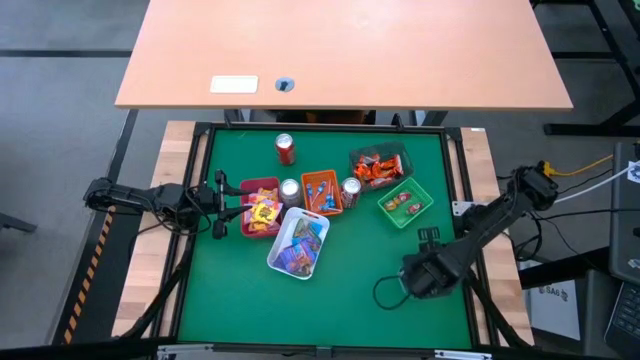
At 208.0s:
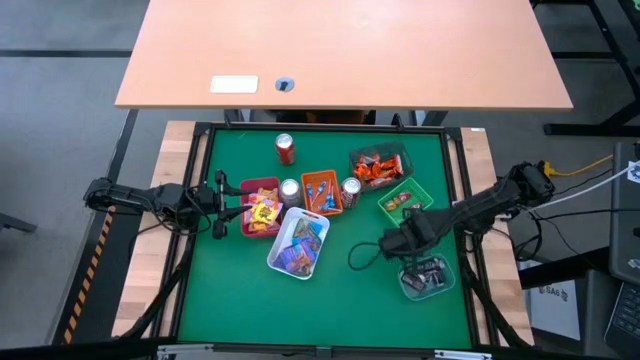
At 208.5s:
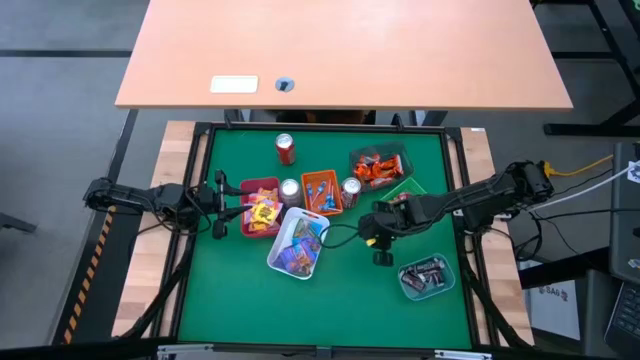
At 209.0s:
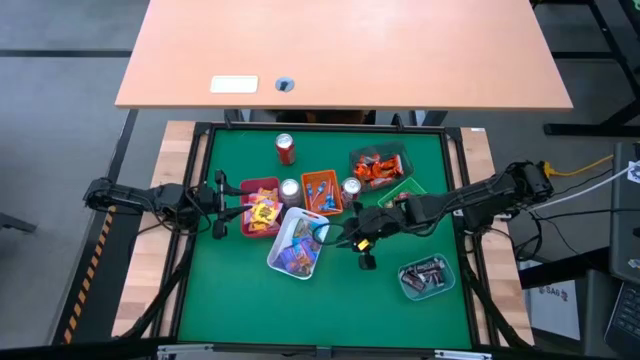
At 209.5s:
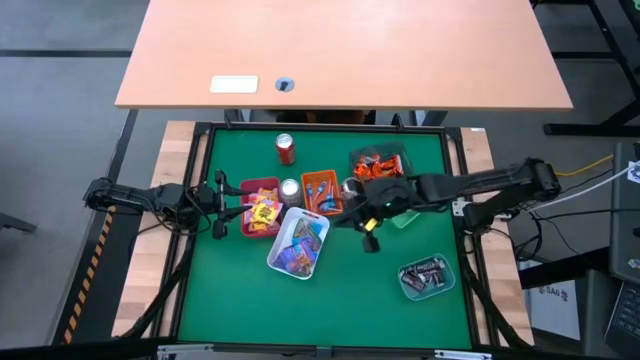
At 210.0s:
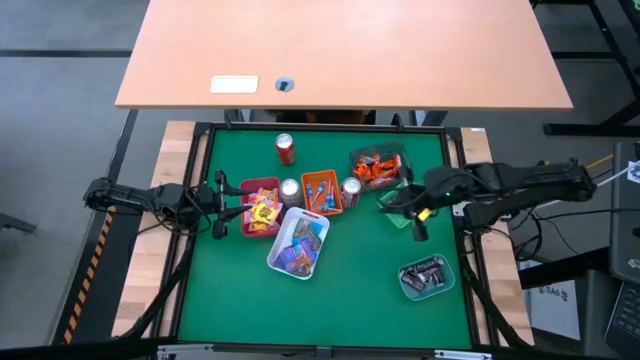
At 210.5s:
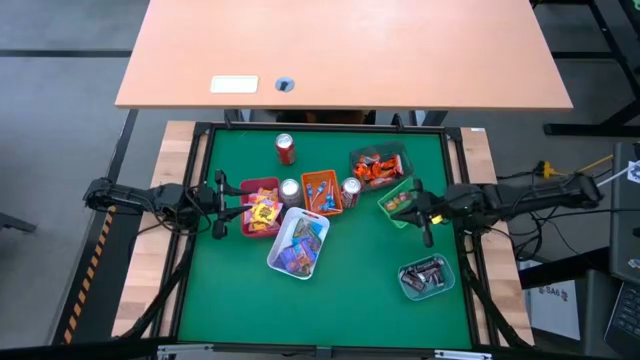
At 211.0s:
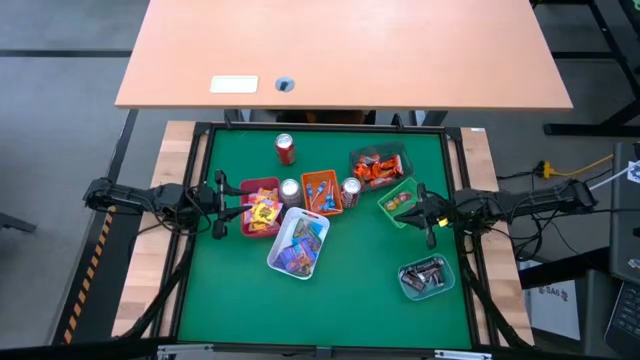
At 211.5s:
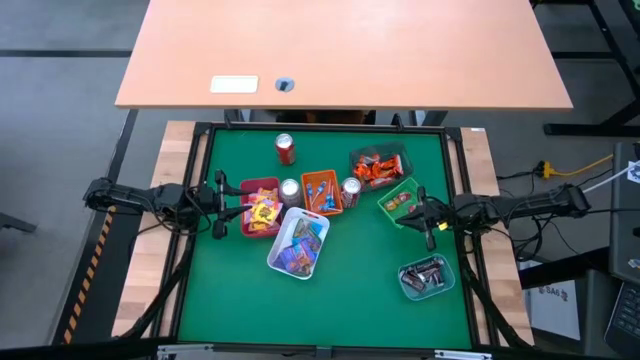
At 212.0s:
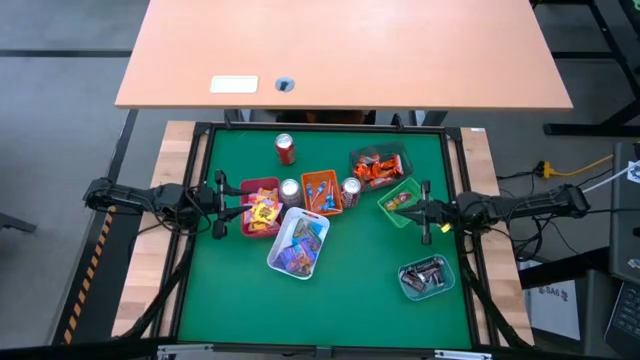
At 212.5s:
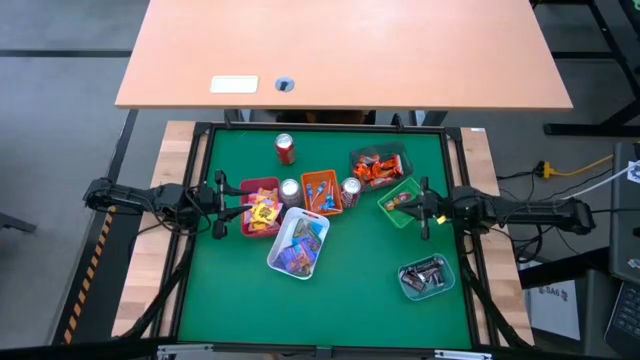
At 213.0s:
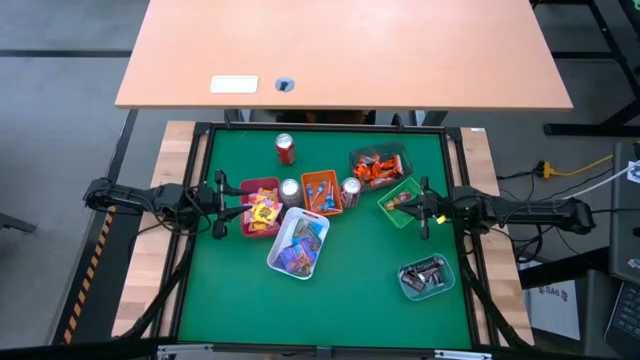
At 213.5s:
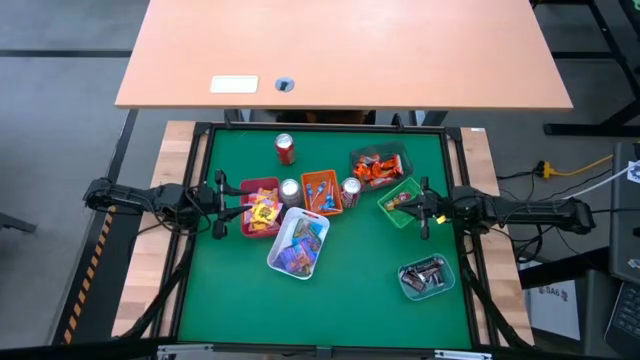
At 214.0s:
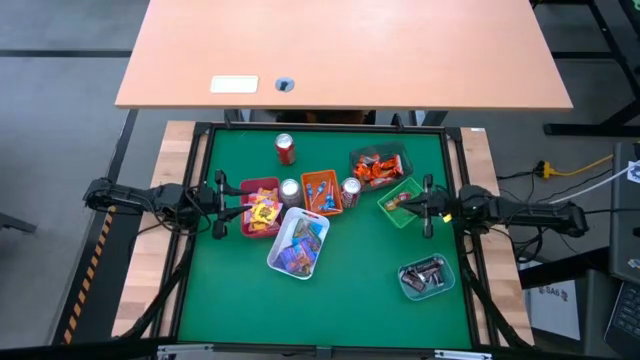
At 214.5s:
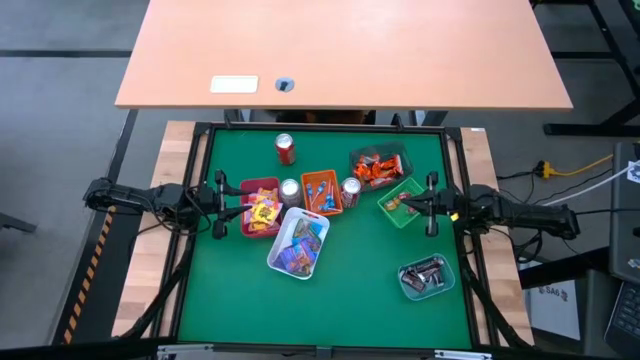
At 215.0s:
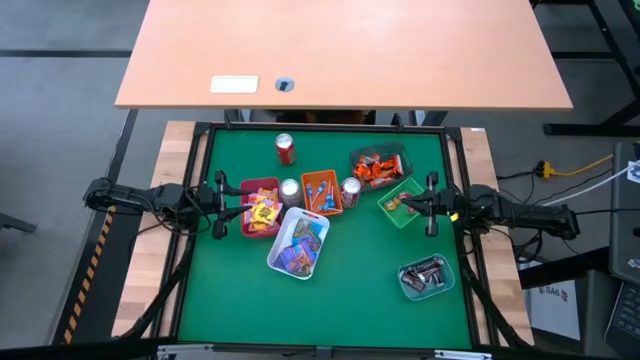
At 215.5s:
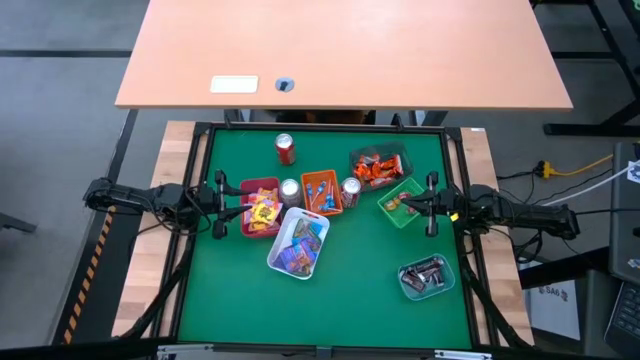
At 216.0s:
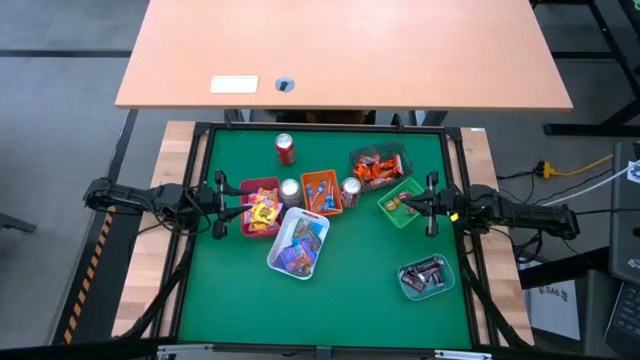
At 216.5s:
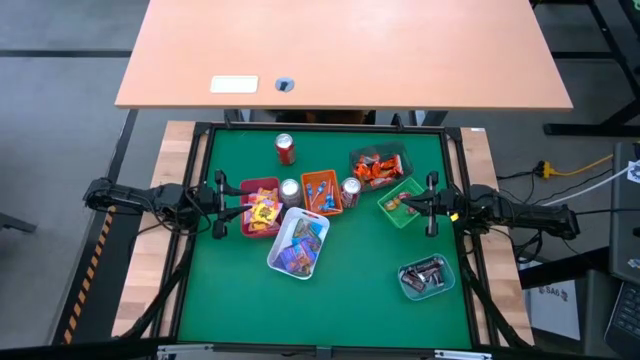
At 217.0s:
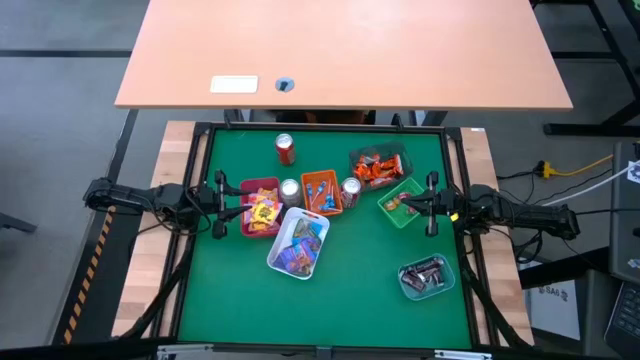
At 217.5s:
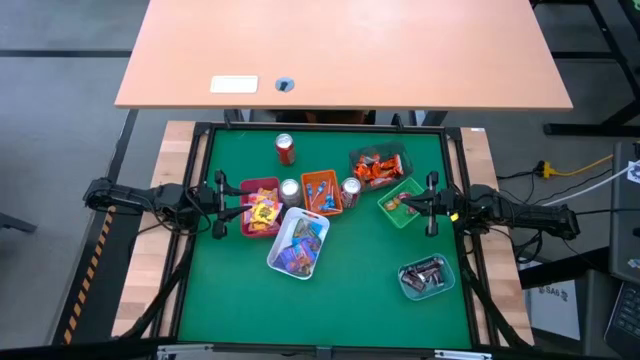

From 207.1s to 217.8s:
Task: Sort candy
Return to Home Position

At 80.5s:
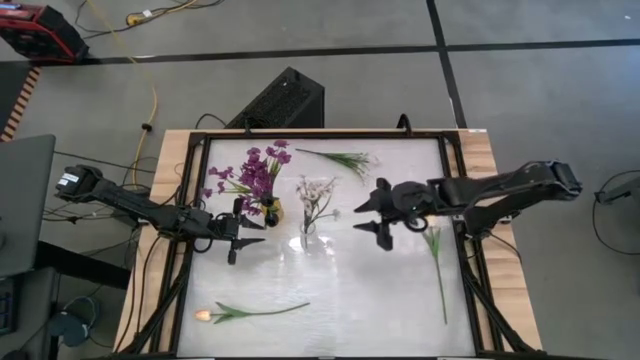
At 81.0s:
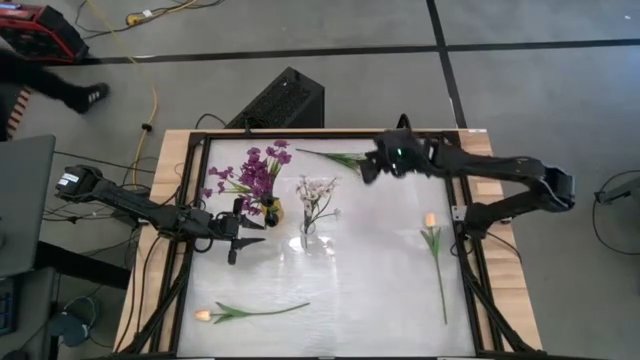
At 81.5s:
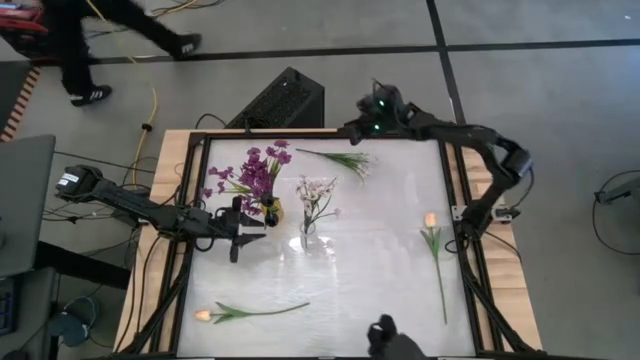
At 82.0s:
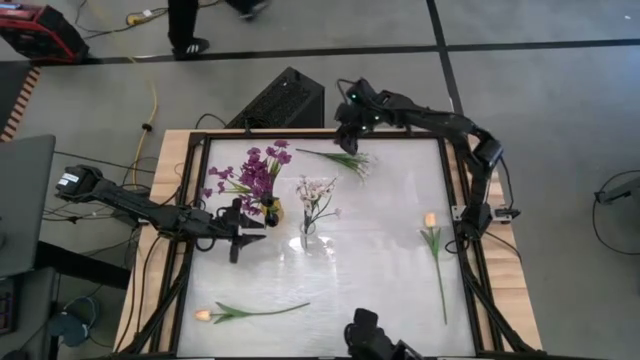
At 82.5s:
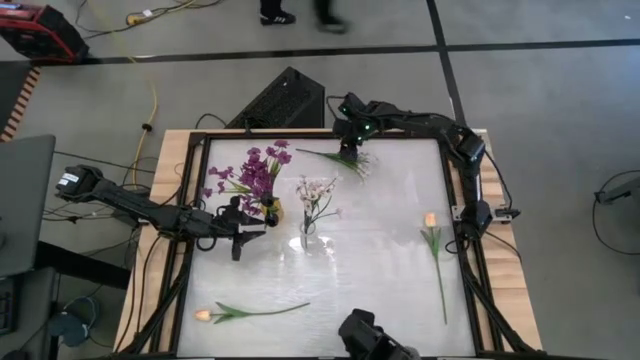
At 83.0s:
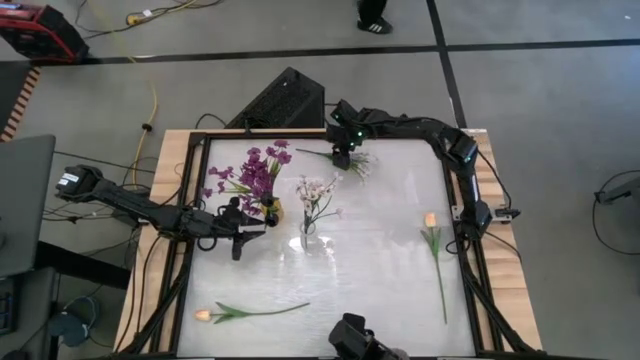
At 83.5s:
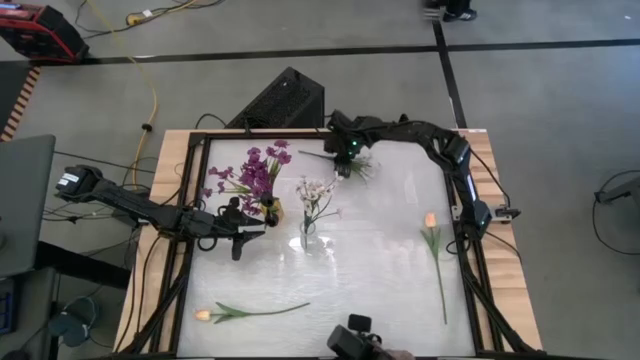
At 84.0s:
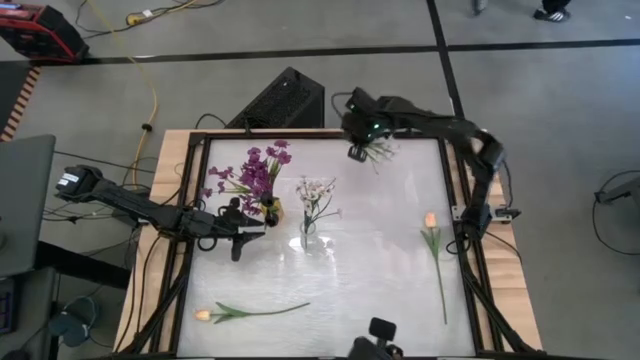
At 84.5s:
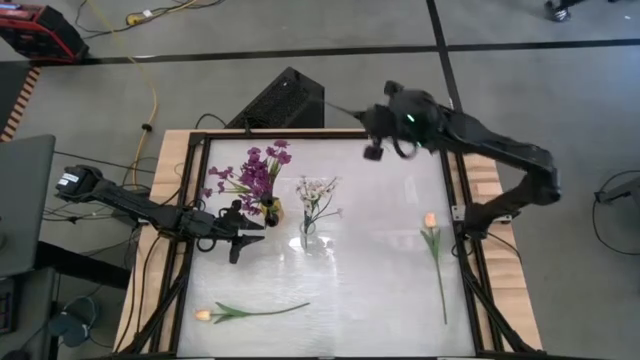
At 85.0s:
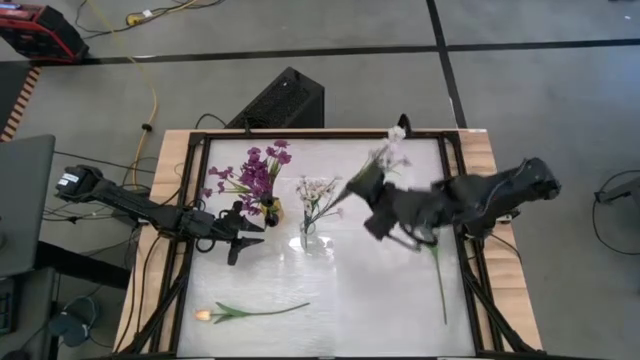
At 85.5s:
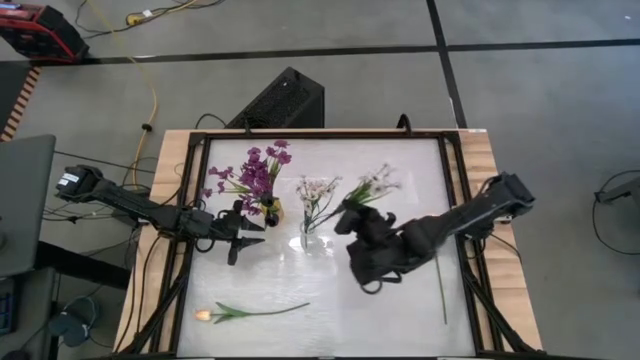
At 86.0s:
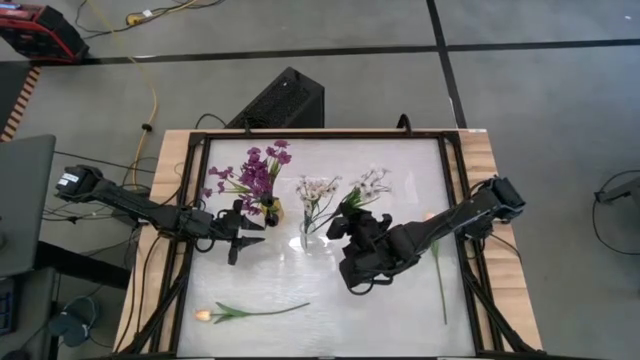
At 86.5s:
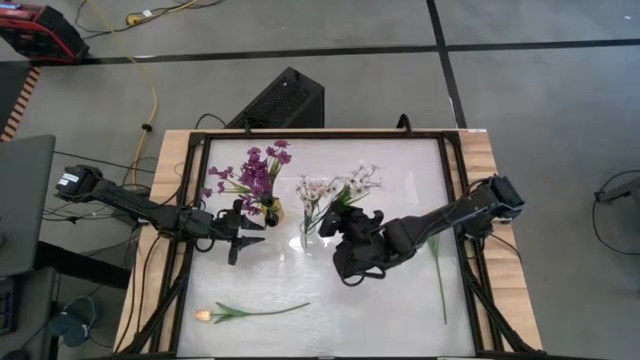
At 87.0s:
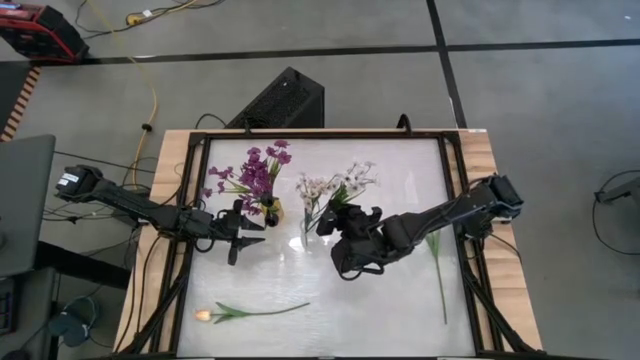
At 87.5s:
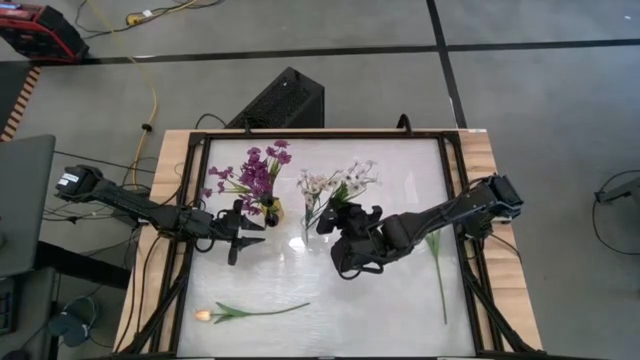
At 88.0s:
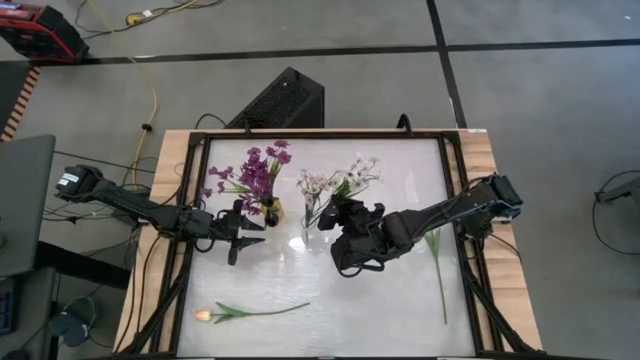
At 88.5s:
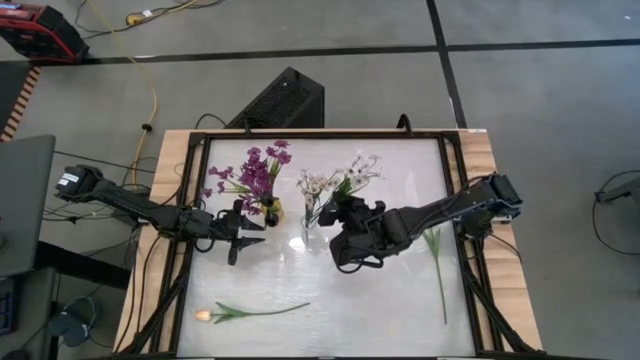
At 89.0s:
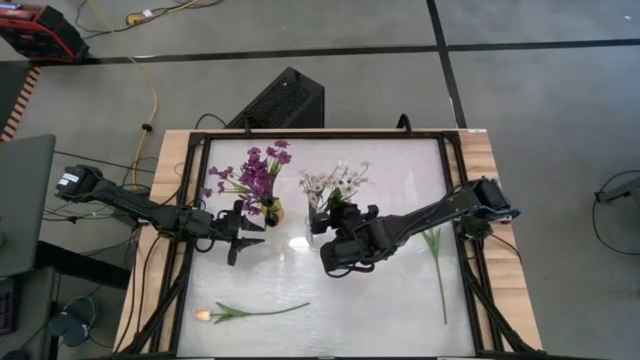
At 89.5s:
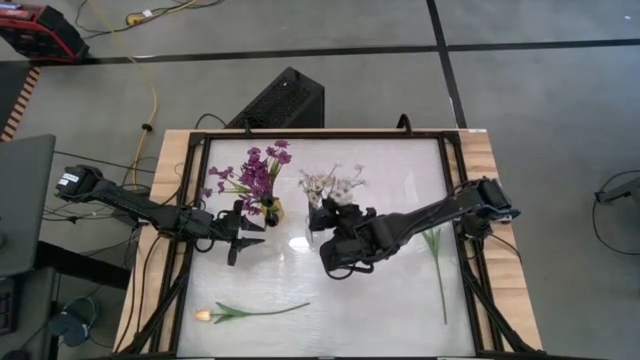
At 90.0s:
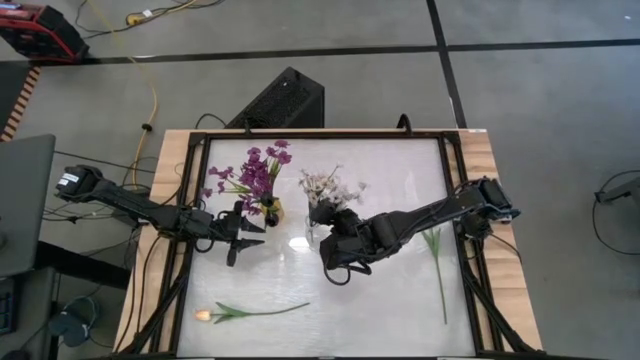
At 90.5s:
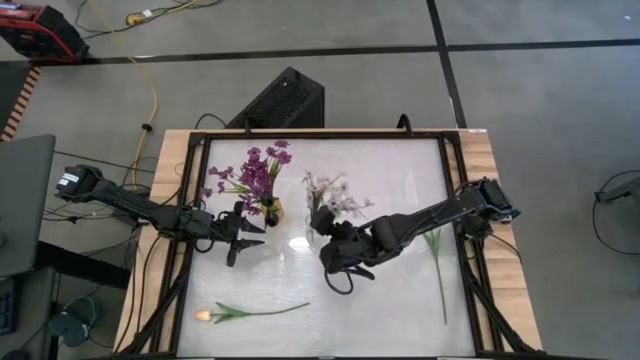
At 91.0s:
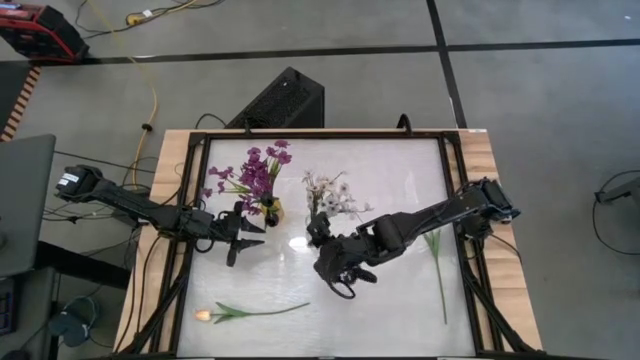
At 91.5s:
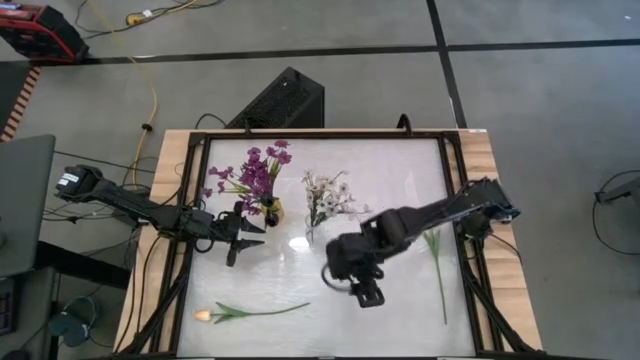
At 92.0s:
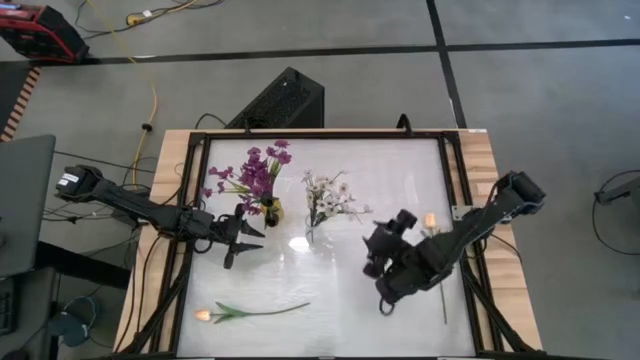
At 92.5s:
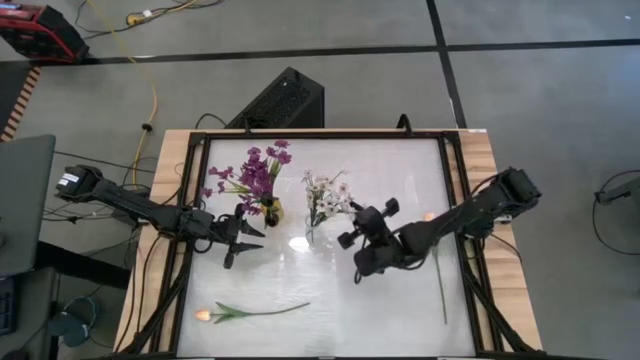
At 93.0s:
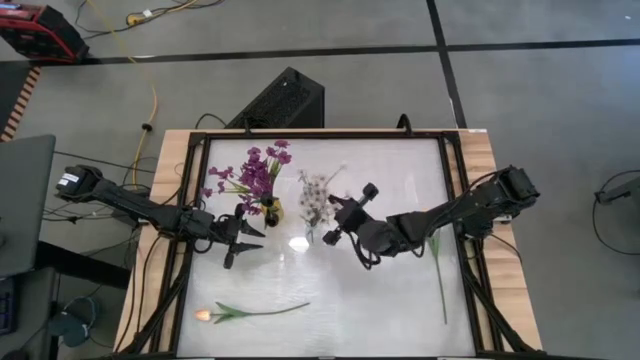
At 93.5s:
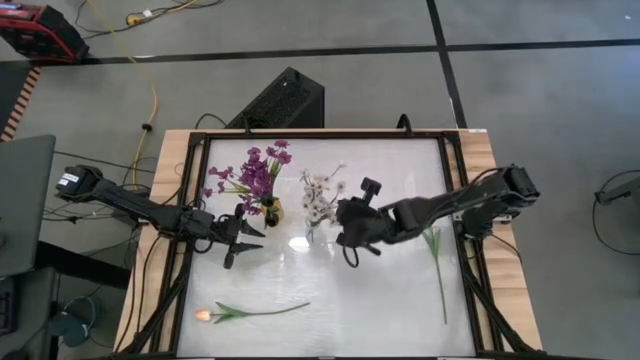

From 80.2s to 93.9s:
Task: Sort flowers into vase by color
Put the white flower into the transparent vase
